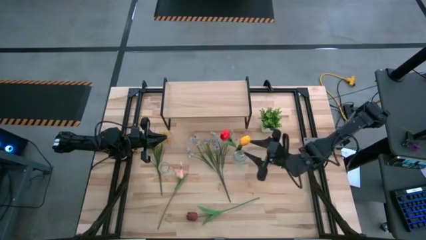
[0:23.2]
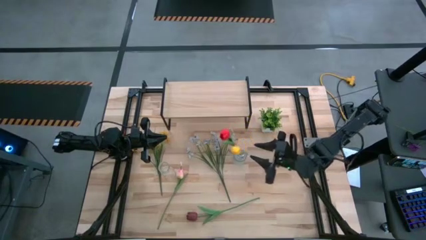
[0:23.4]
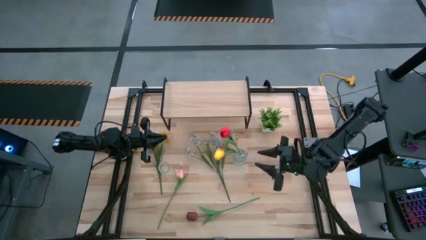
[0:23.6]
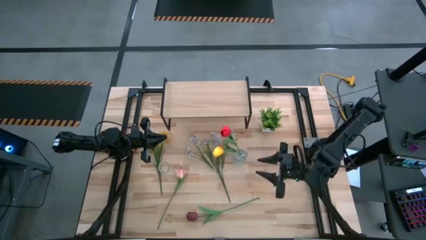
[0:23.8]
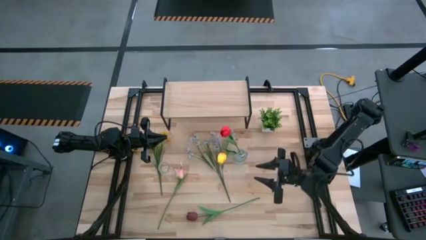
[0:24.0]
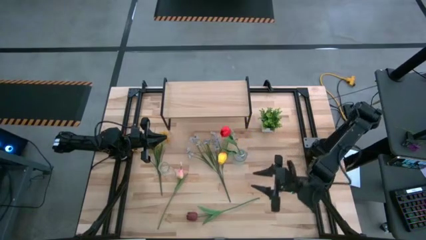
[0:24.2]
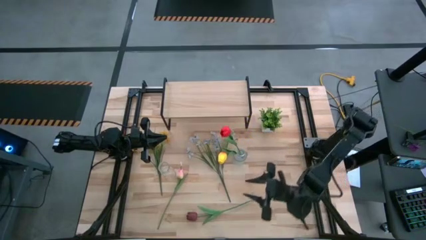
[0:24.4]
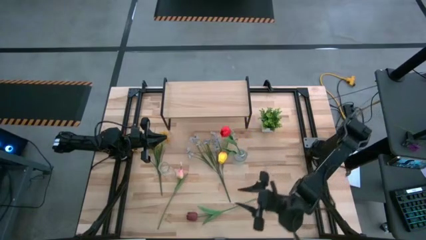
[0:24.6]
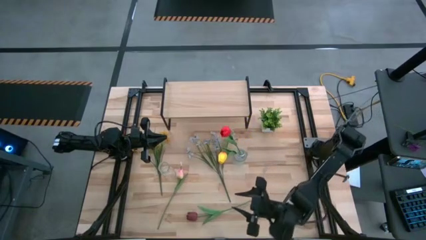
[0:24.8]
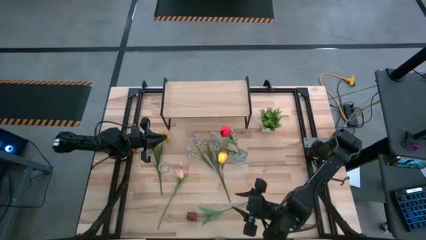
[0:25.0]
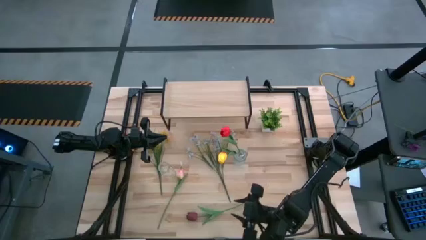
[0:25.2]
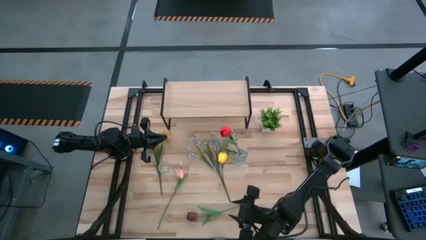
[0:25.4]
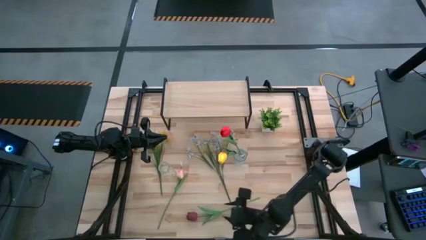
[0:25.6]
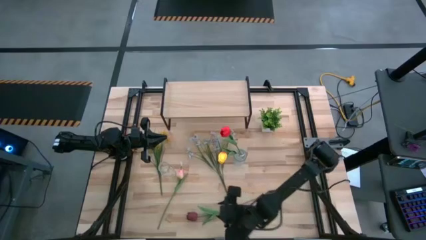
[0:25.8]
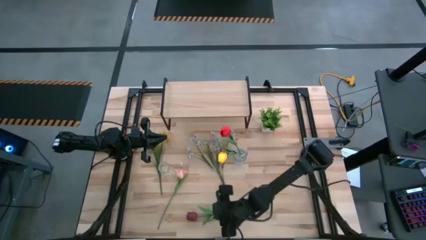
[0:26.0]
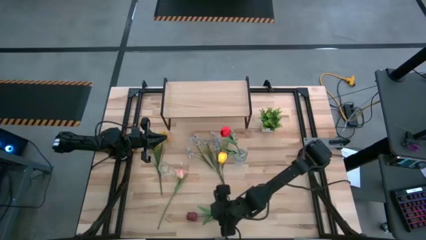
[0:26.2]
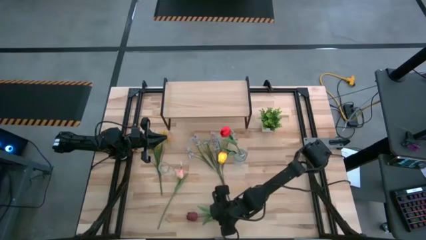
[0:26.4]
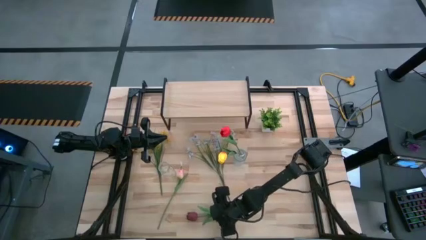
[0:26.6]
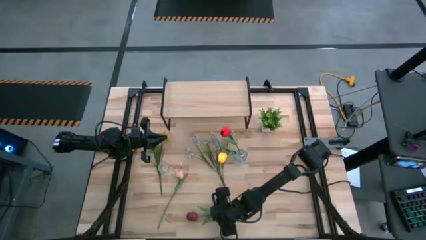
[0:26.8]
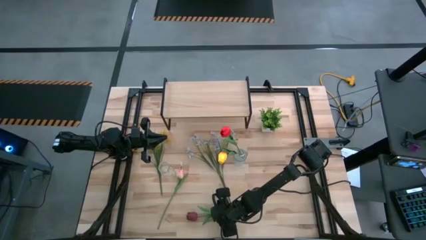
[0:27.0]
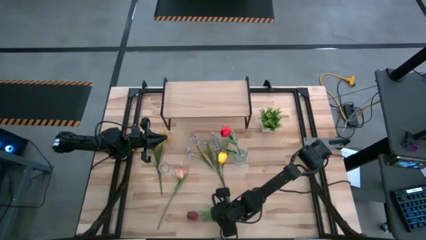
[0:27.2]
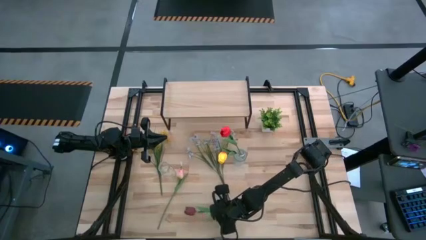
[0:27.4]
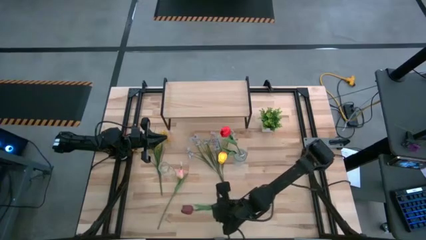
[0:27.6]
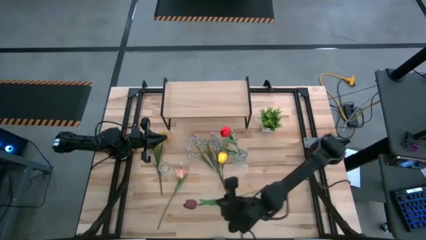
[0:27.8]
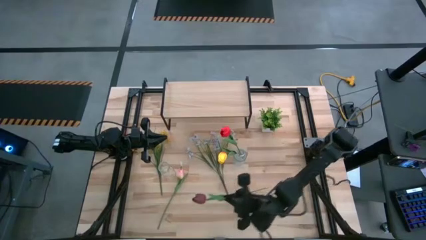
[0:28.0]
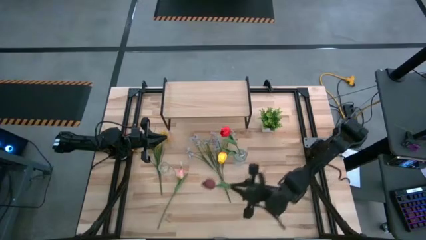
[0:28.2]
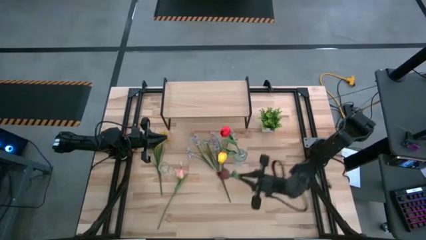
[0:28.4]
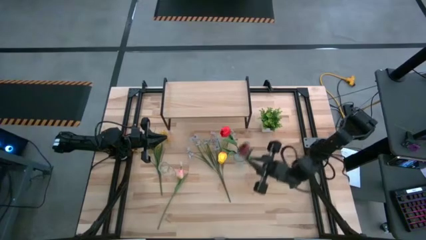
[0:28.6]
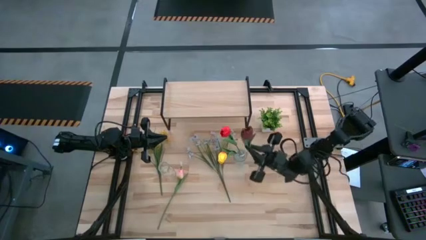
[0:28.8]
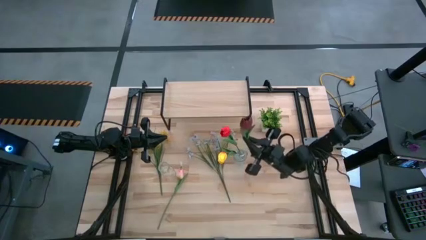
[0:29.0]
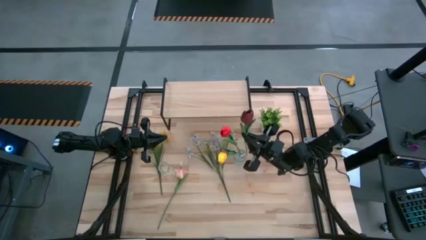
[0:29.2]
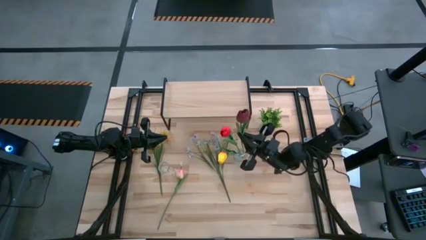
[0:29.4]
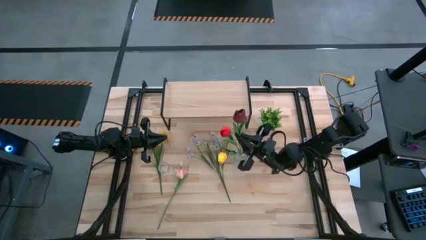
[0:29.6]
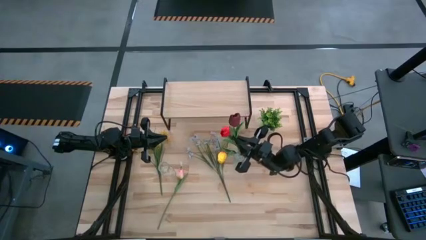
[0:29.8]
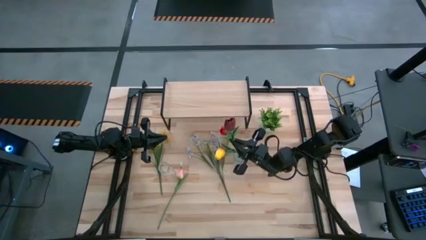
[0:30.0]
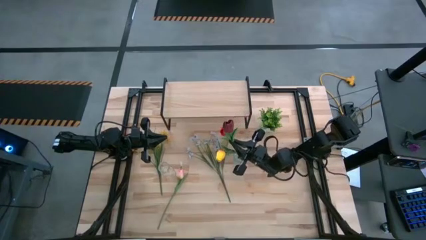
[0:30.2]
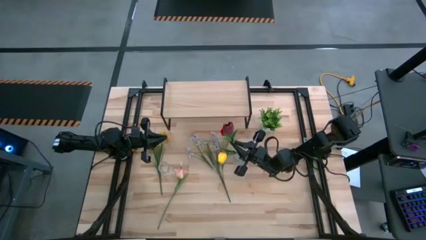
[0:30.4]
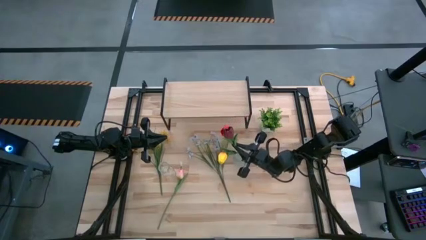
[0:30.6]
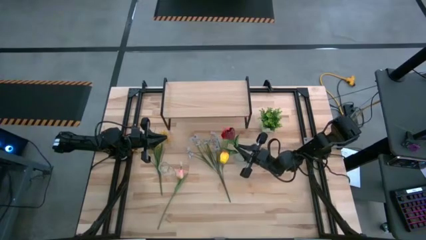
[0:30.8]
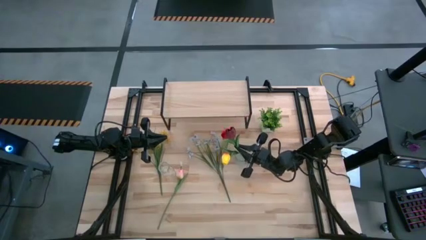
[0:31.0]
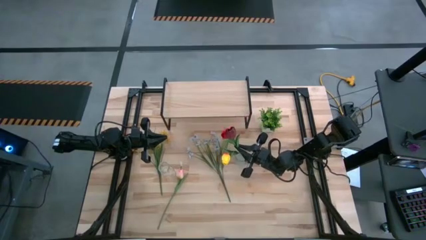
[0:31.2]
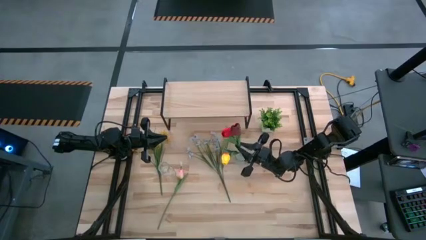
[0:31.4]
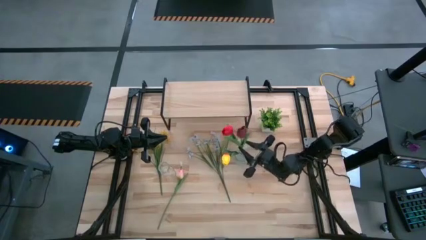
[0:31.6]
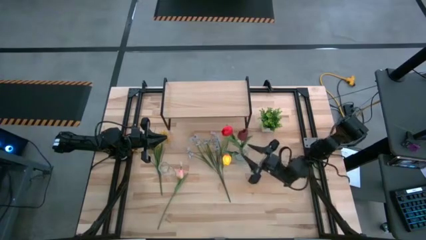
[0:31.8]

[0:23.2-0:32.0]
Task: Pick and place flowers into a vace then onto a shelf
Put the dark red tulip into the top transparent vase

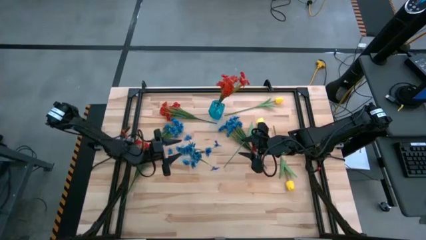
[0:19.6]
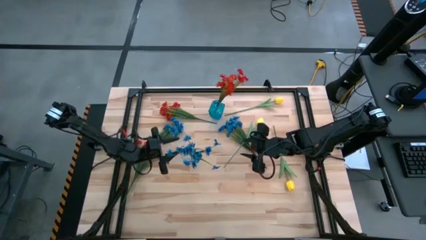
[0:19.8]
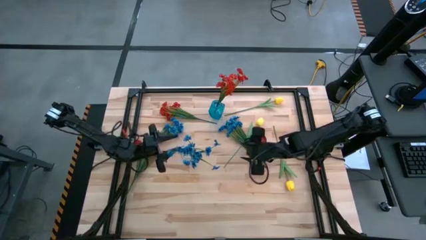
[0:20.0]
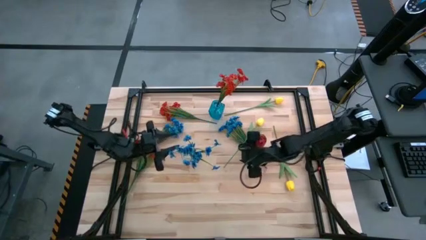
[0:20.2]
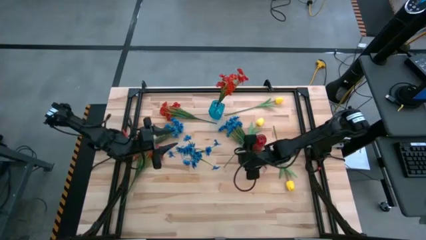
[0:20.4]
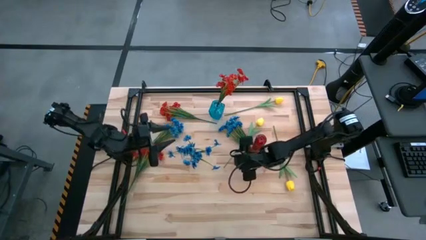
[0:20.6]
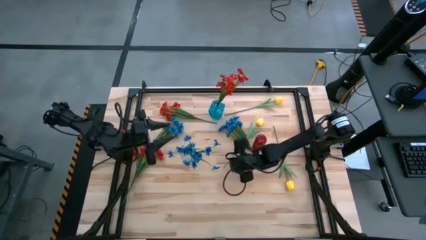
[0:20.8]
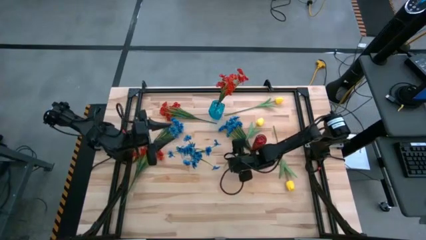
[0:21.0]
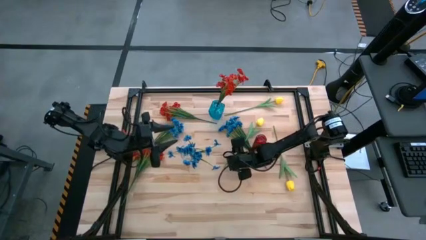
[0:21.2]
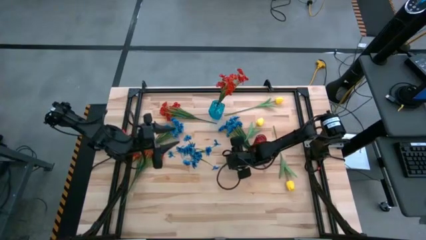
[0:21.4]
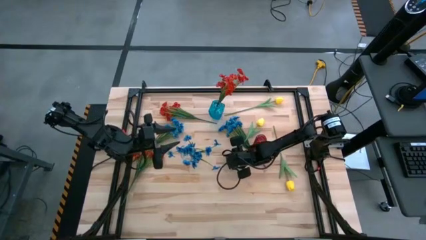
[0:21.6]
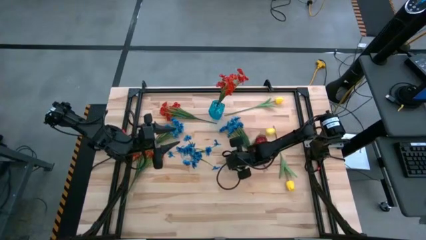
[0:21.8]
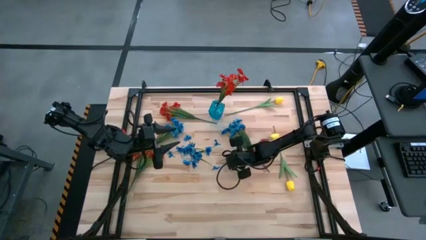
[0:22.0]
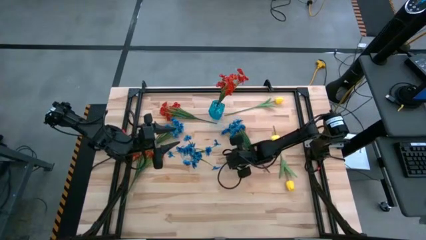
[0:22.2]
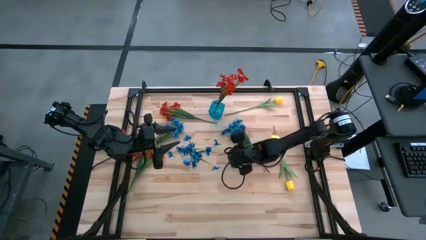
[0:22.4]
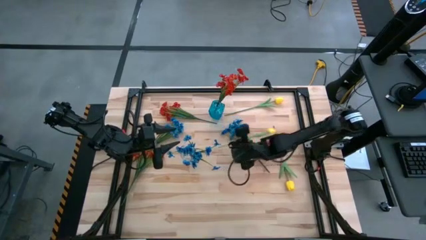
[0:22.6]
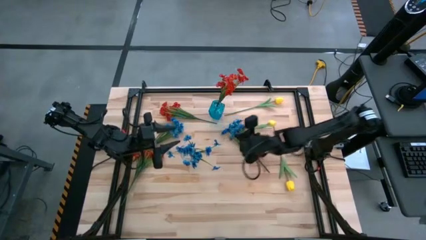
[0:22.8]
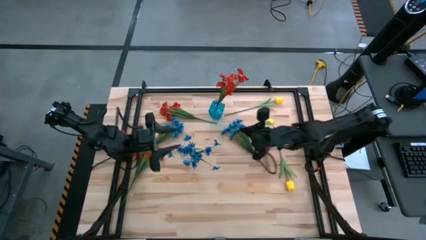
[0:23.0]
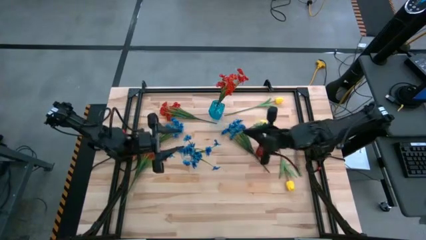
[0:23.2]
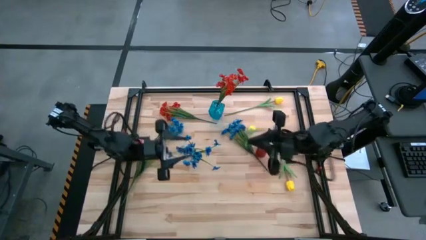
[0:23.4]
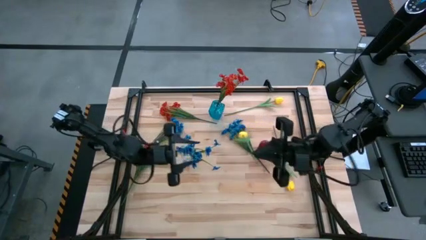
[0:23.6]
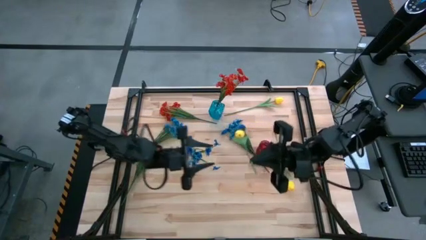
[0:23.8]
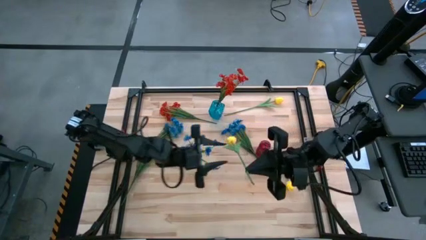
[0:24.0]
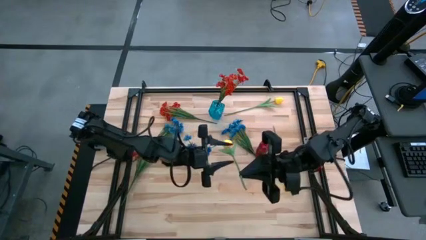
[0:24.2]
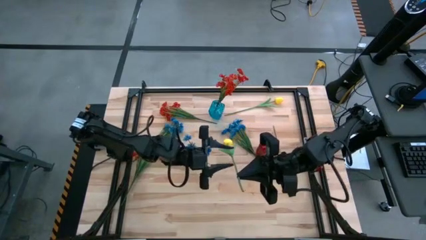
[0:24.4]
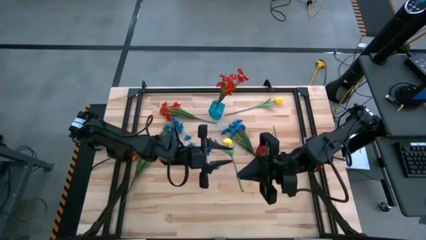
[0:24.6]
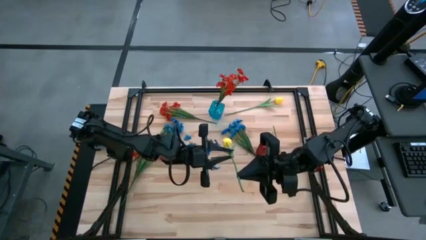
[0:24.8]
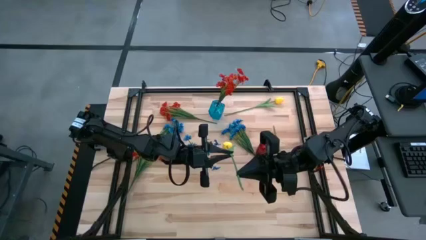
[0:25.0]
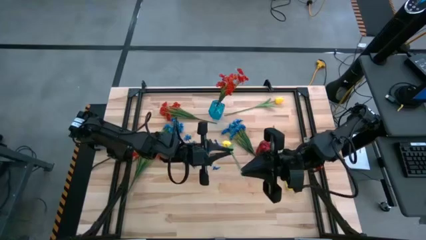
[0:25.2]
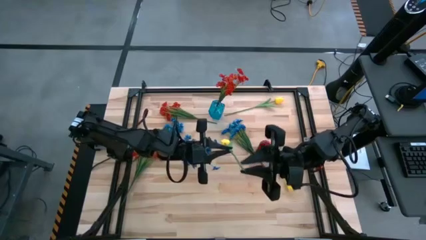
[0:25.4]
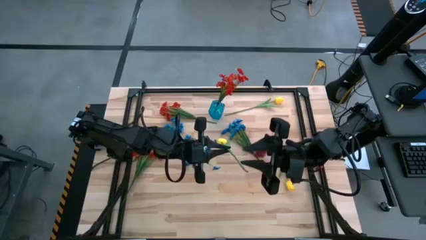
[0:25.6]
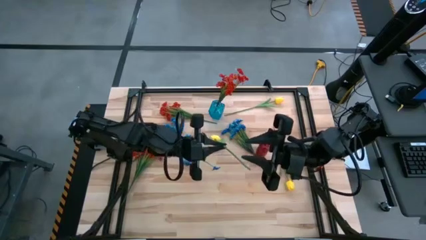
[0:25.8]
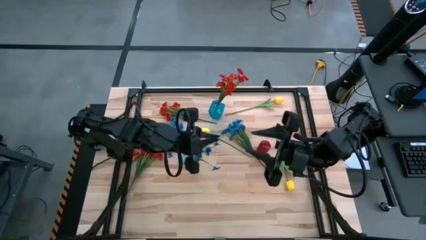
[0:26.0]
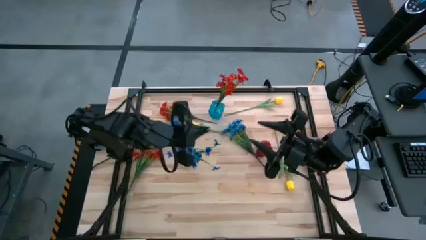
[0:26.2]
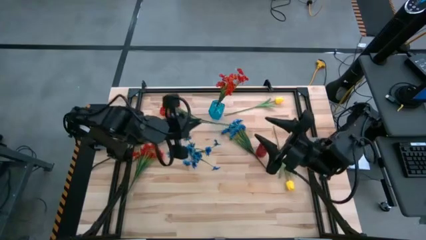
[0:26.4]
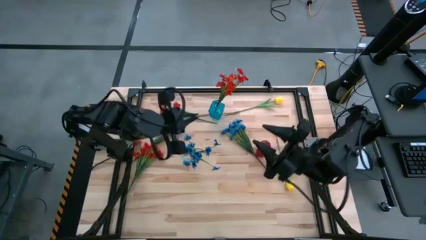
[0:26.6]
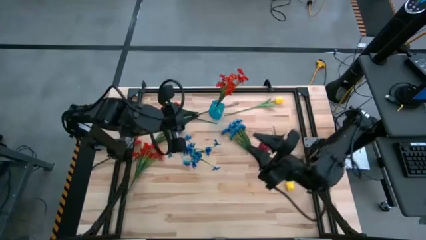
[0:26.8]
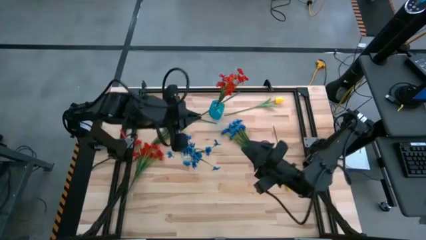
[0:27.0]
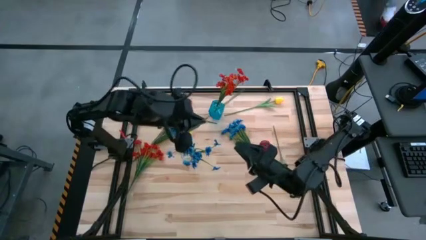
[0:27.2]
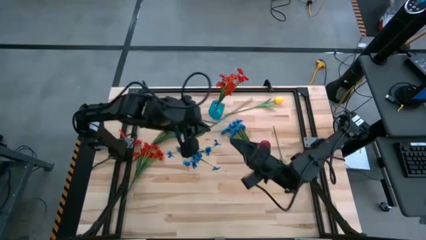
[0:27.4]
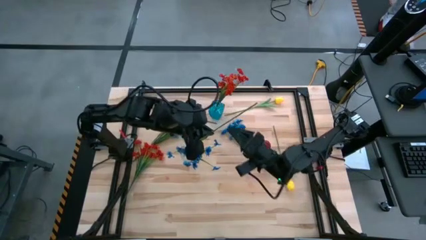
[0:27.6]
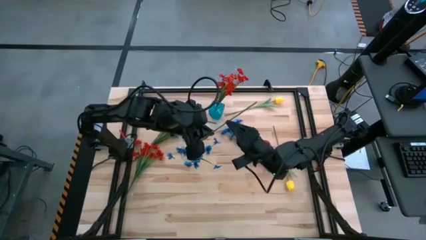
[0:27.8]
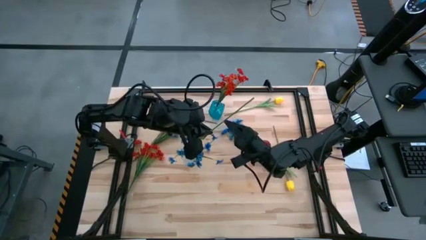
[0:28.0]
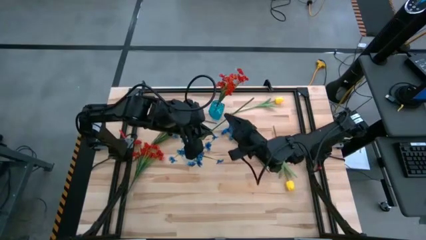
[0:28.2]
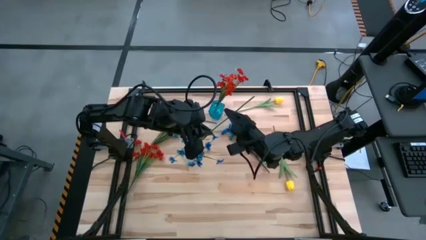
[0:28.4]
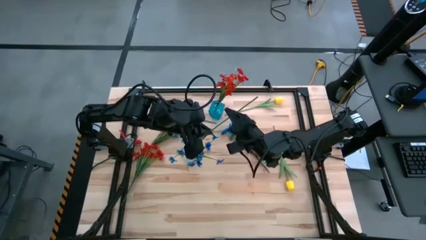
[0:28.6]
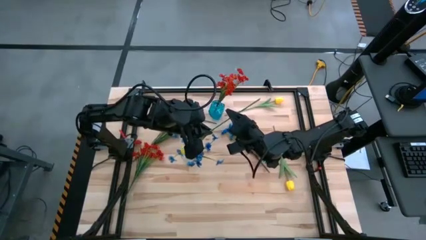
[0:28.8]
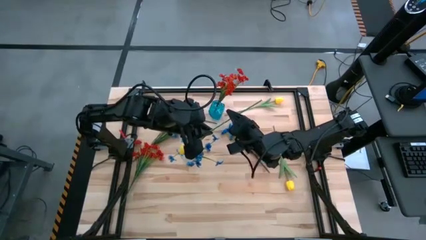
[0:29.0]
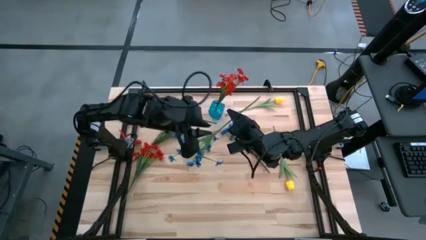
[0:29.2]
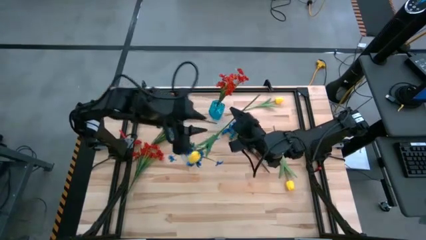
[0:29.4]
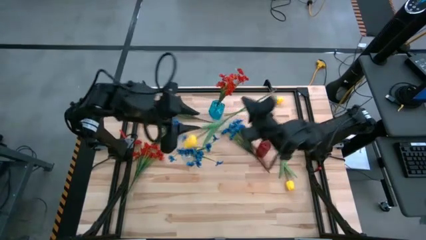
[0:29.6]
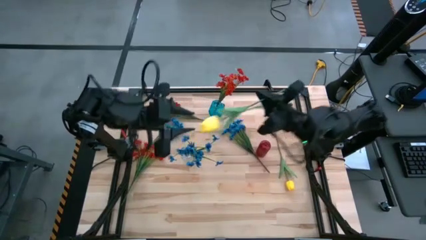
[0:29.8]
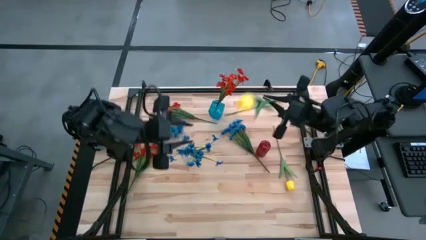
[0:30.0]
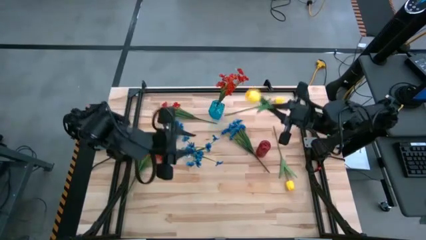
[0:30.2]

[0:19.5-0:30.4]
Task: Sort flowers into vase by color
Put the middle yellow flower into the red vase
